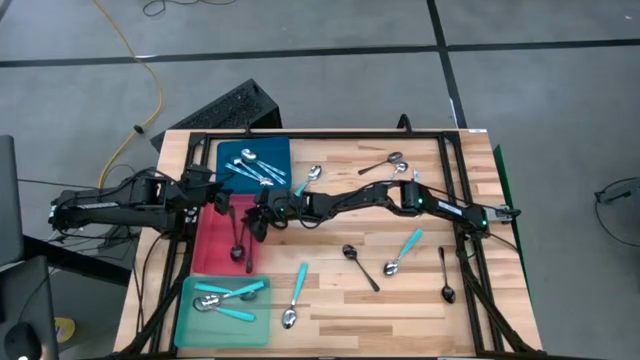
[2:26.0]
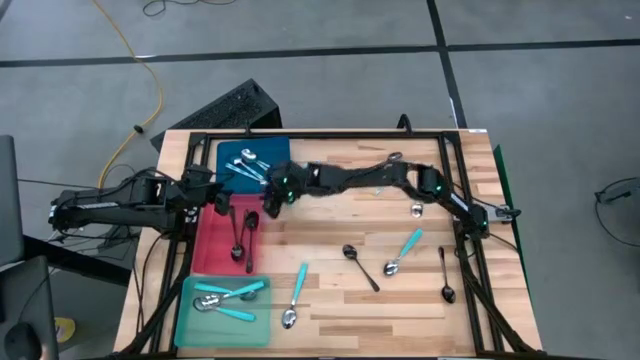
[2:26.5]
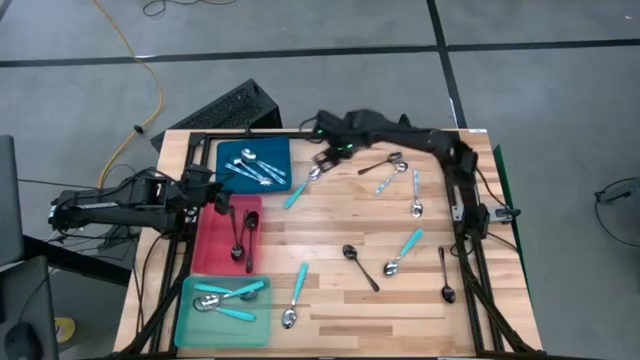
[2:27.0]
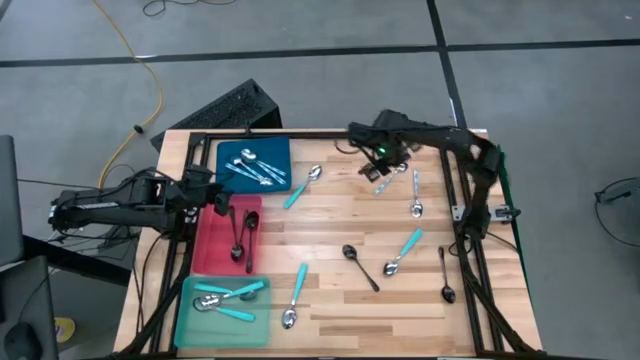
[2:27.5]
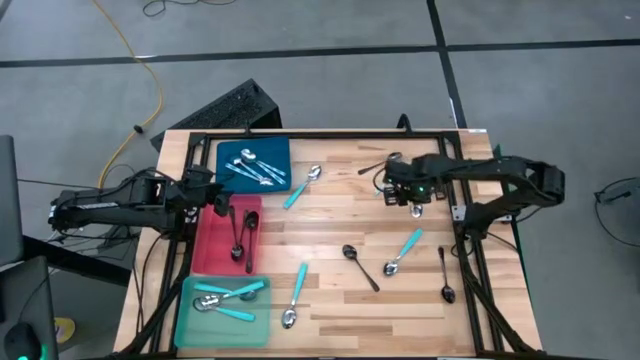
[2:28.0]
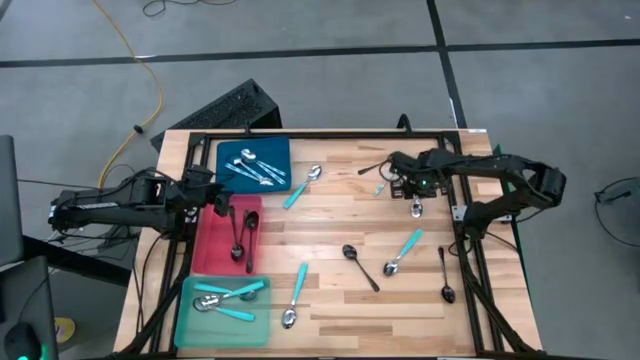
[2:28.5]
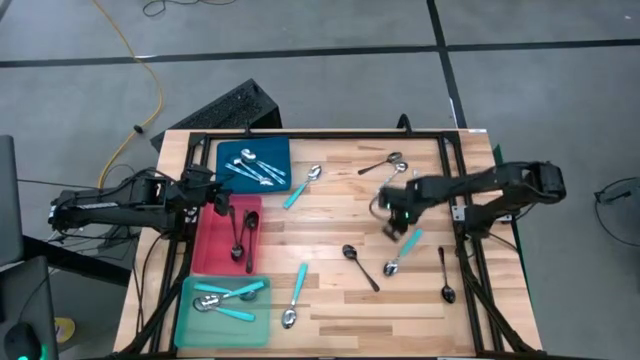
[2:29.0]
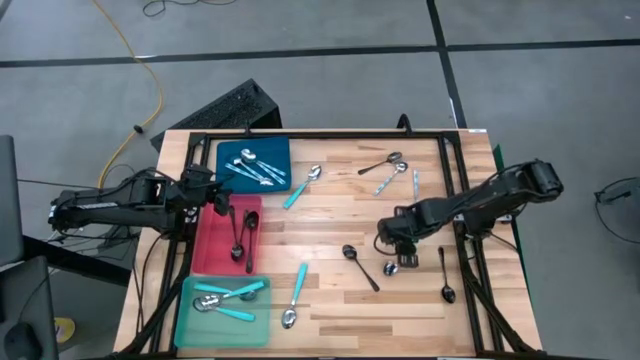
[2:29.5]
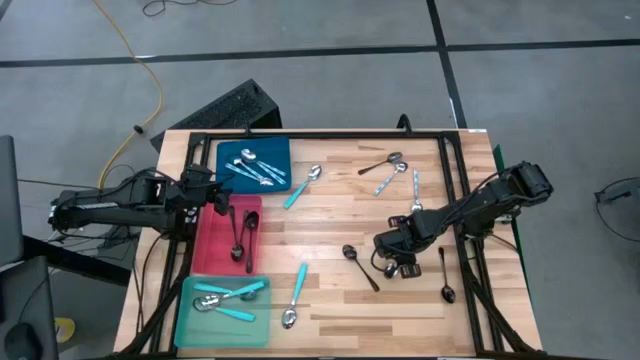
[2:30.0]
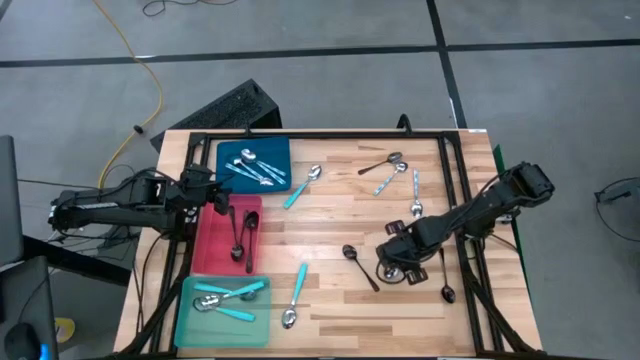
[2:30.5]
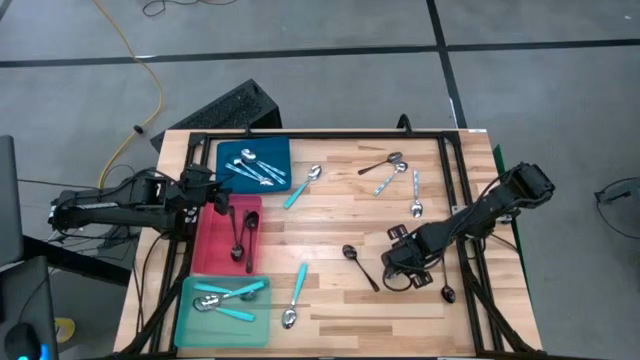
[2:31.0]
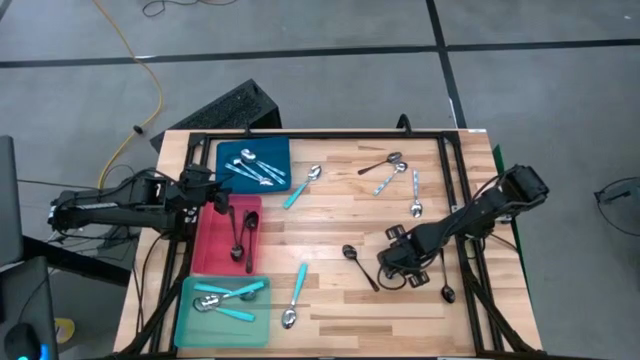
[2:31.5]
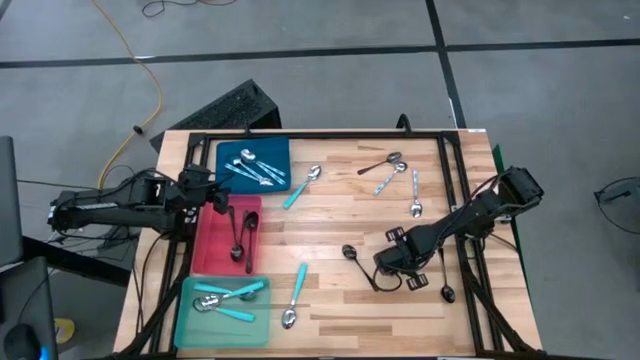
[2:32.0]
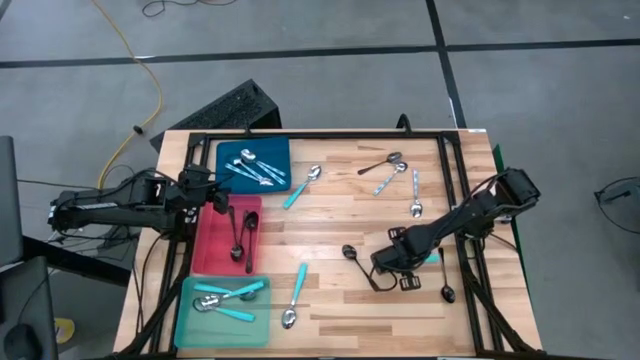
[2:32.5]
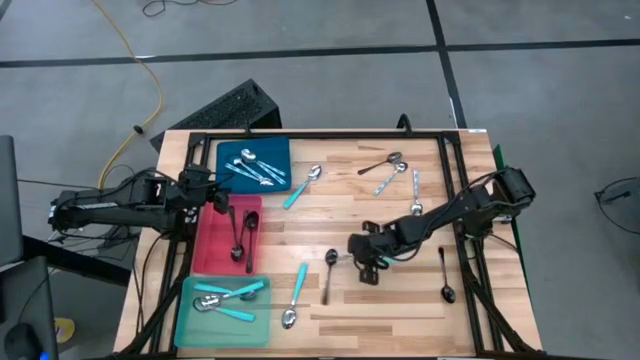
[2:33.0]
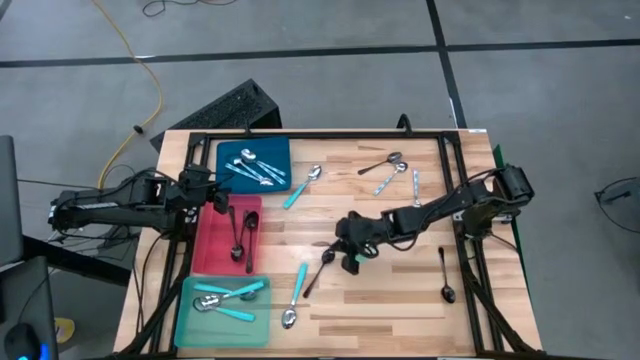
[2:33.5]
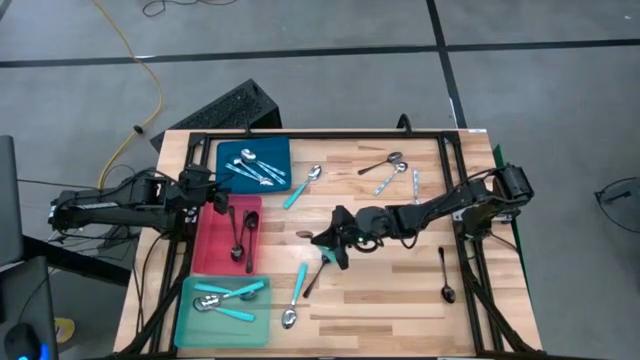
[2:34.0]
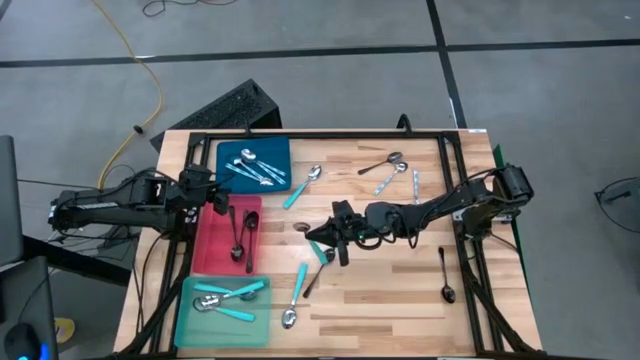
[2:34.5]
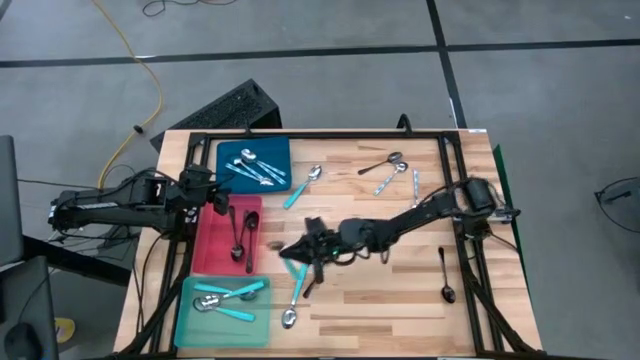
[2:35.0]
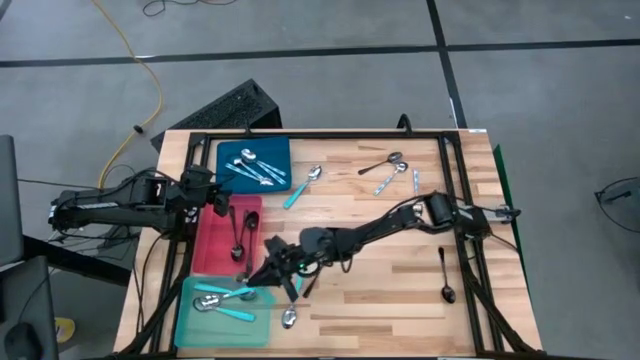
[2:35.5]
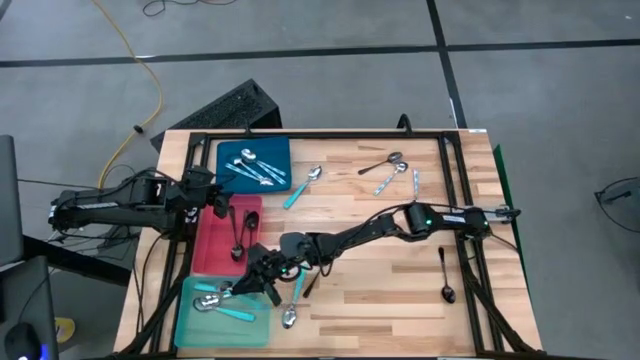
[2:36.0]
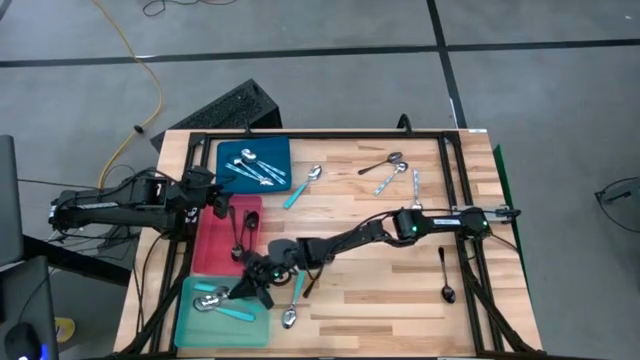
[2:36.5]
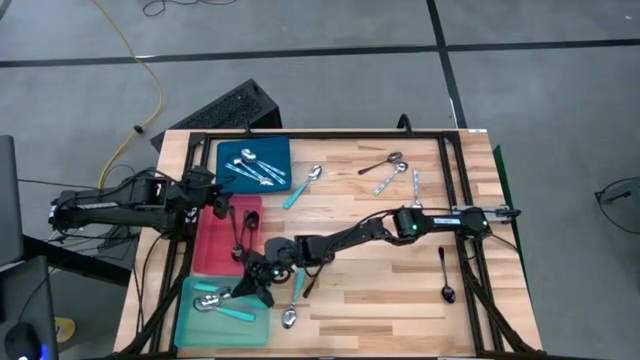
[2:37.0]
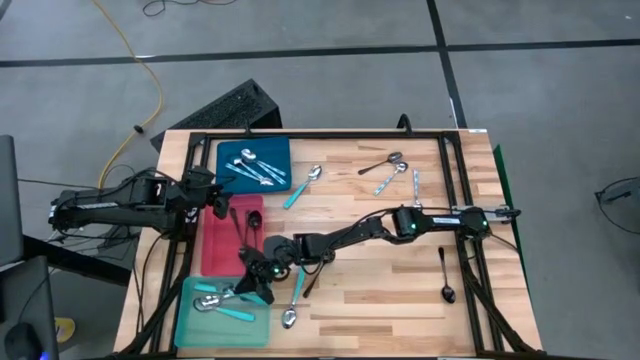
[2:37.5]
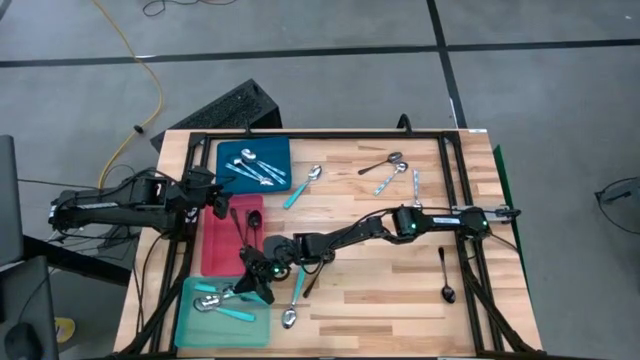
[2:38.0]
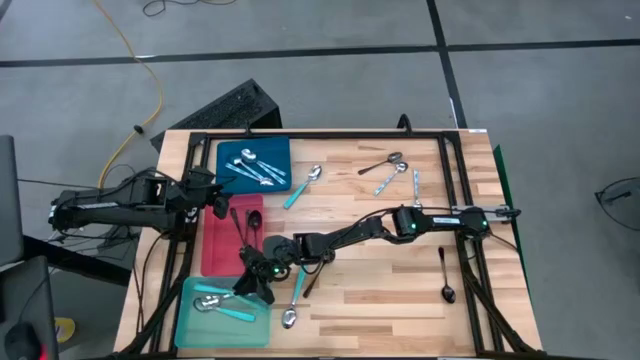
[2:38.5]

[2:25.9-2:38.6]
Task: Sort silverware by color (type)
Put the light blue spoon into the light blue bin

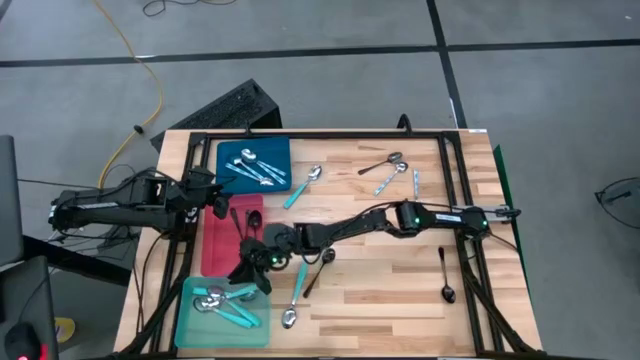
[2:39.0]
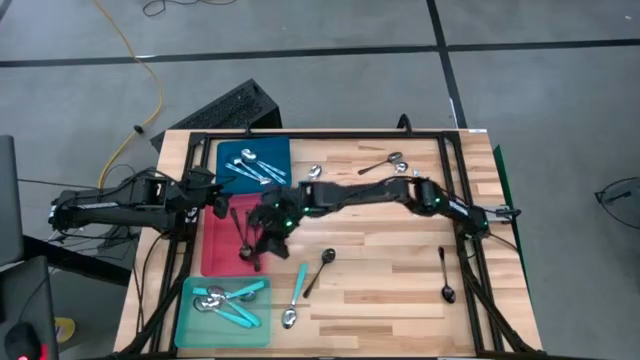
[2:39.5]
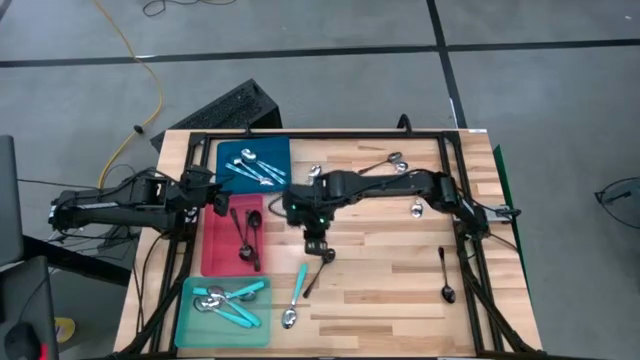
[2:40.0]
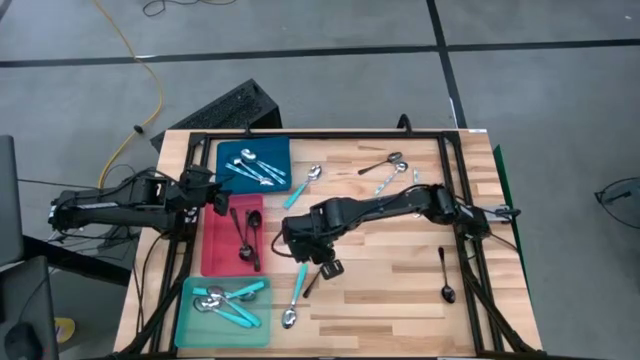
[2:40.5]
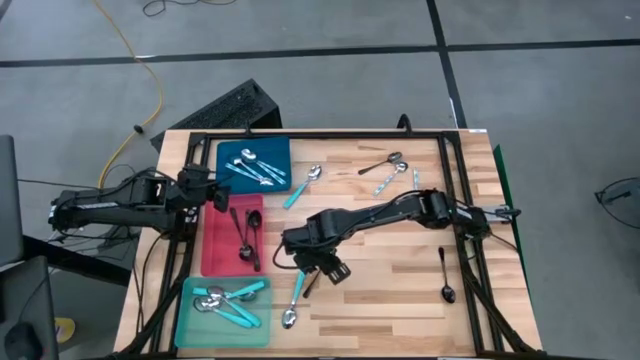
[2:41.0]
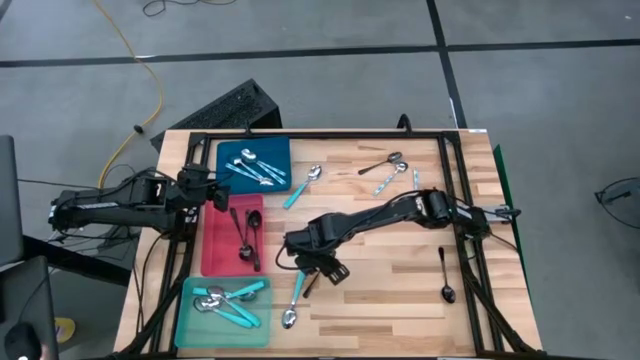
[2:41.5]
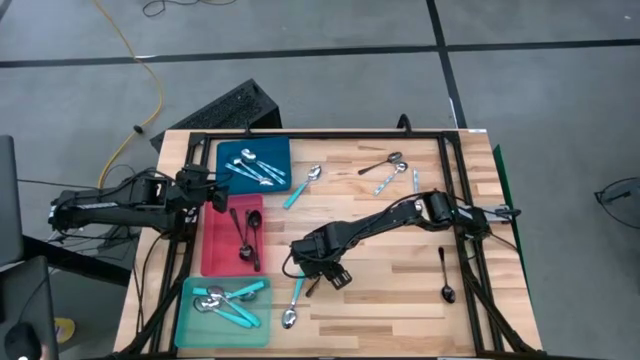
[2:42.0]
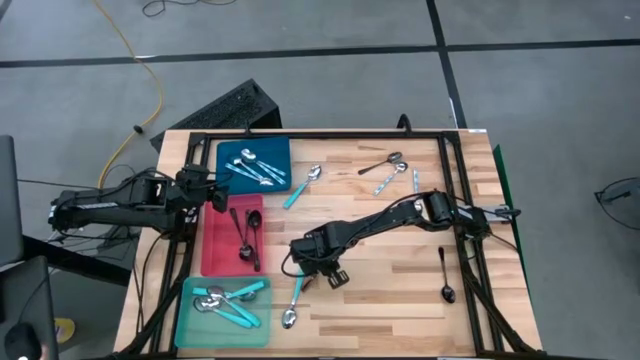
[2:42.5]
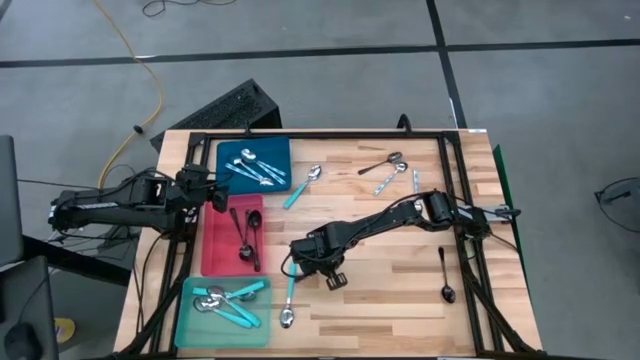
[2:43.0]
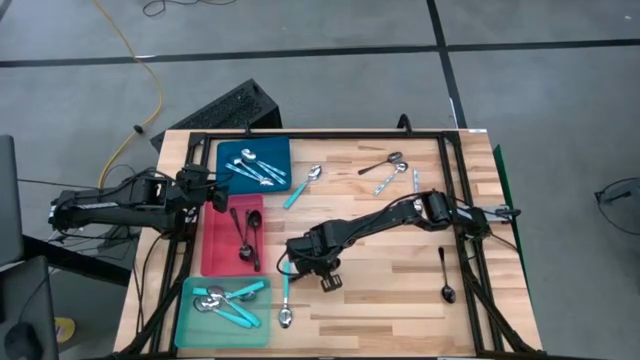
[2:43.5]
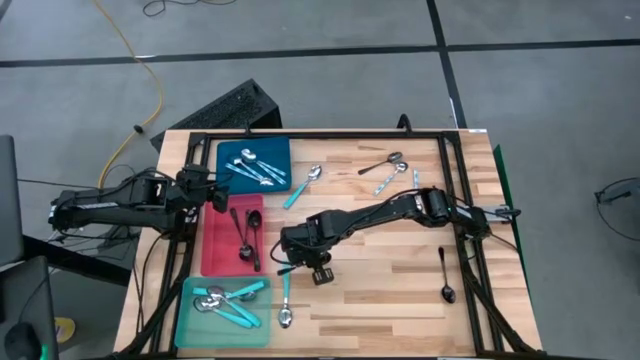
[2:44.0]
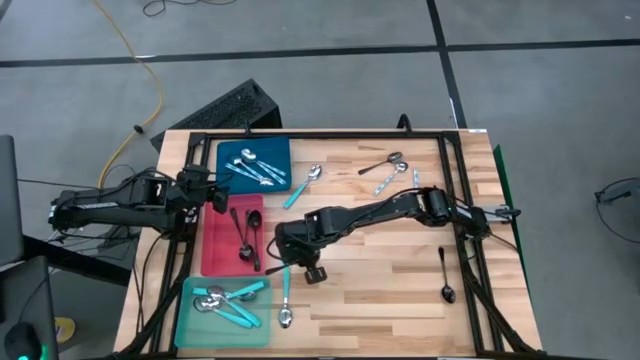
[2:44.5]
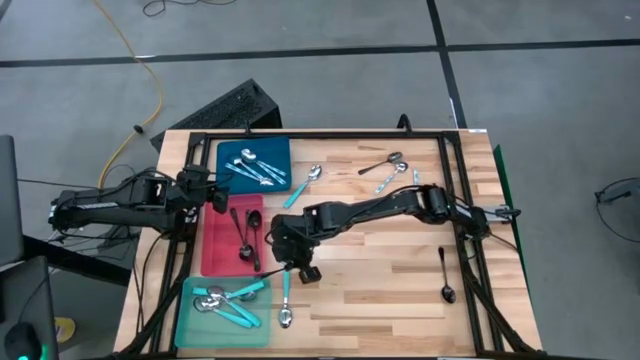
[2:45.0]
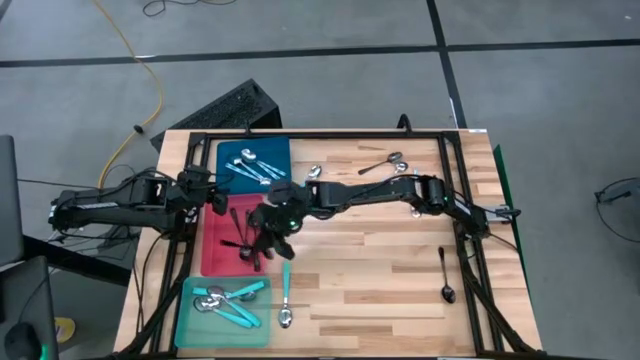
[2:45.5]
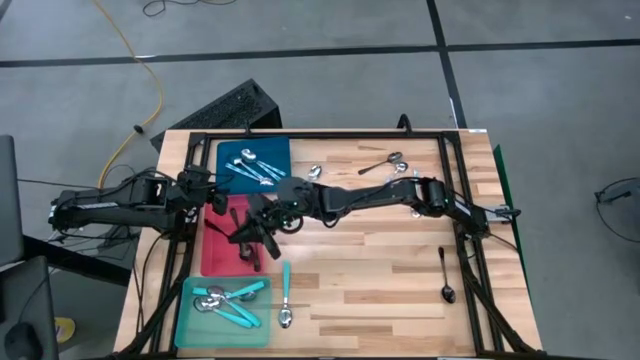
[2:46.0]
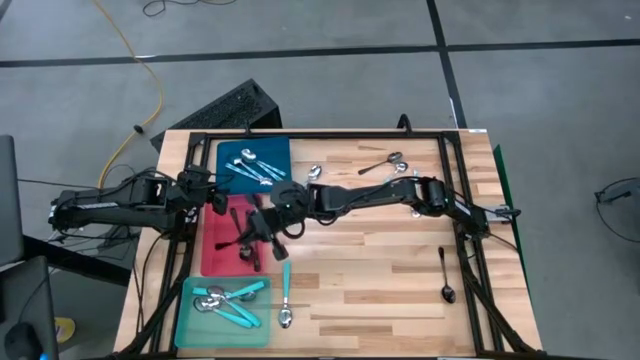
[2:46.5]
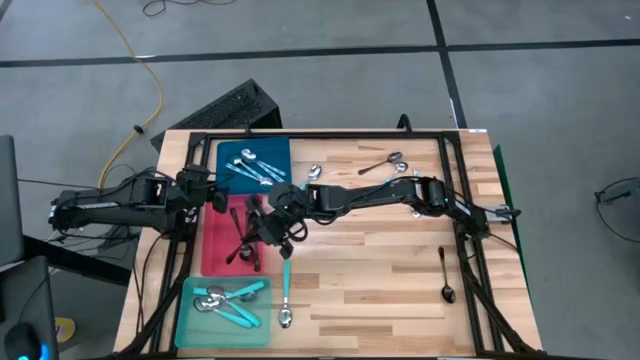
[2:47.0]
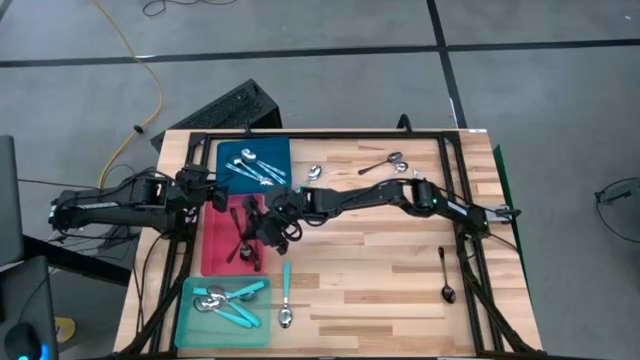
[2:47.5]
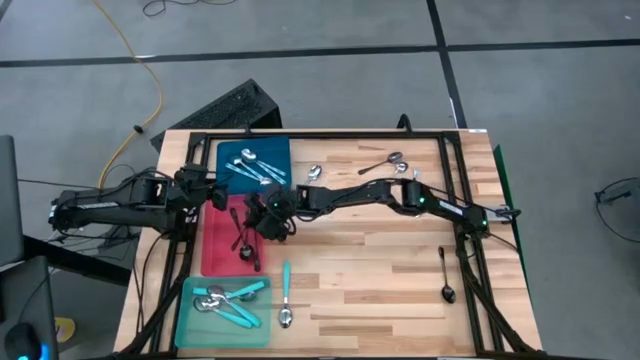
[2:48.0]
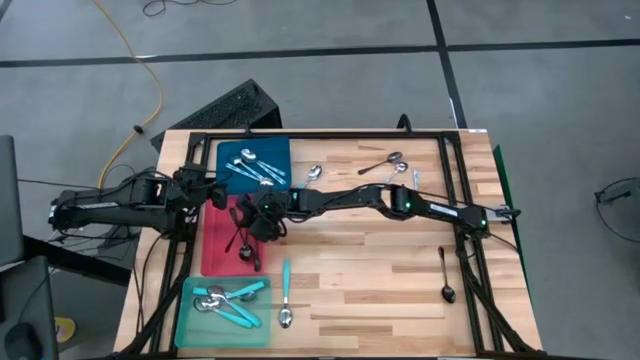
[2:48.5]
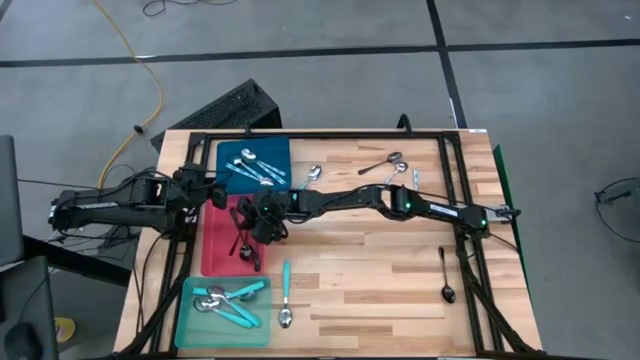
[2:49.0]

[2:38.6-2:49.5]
Put the black spoon into the red bin
